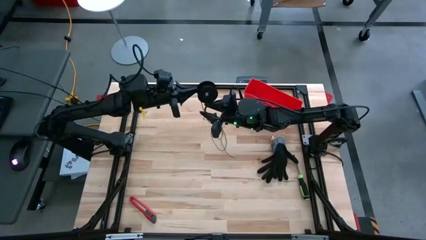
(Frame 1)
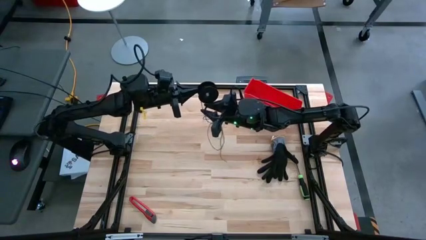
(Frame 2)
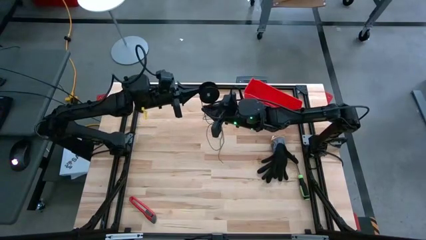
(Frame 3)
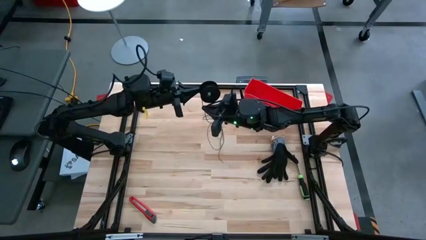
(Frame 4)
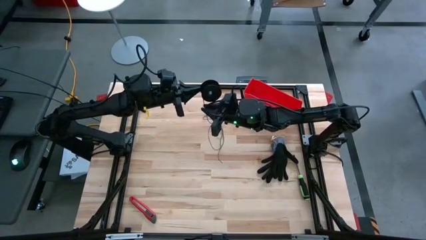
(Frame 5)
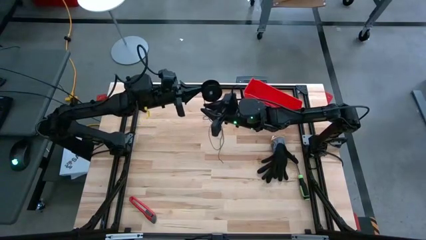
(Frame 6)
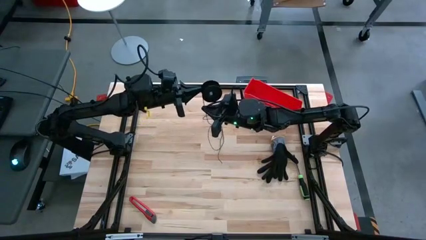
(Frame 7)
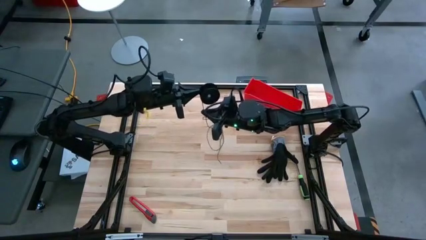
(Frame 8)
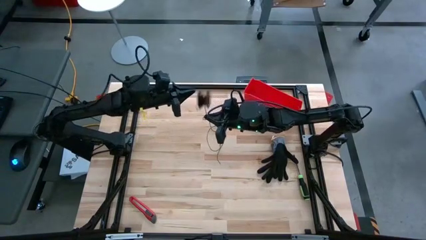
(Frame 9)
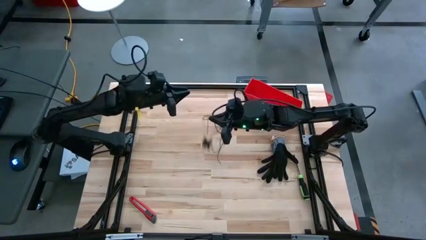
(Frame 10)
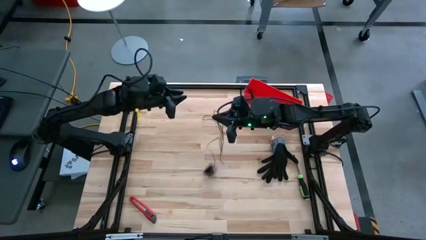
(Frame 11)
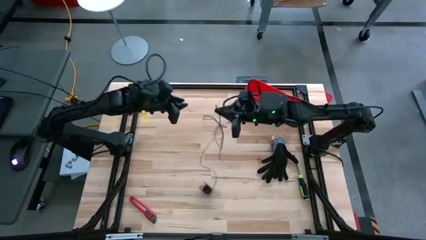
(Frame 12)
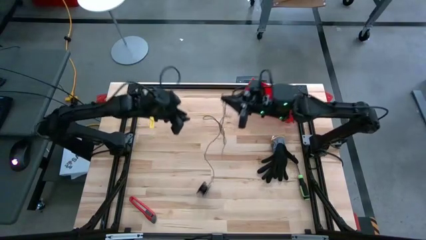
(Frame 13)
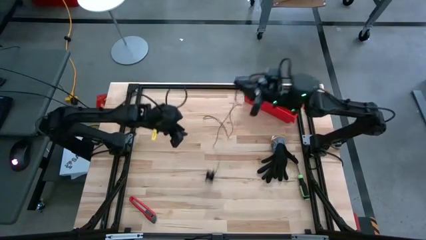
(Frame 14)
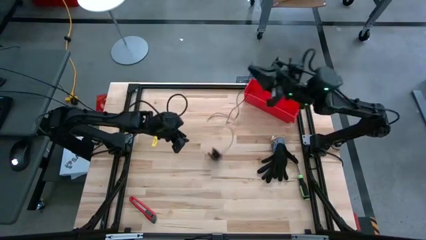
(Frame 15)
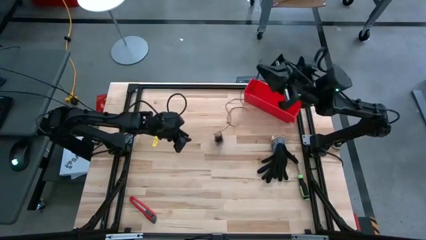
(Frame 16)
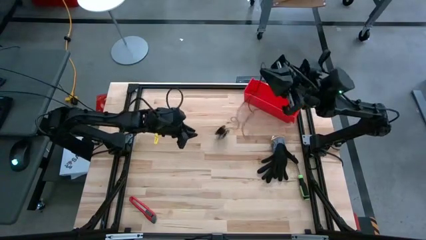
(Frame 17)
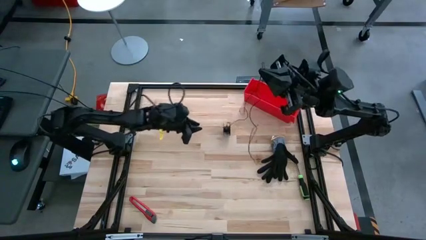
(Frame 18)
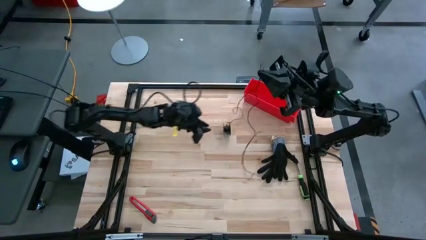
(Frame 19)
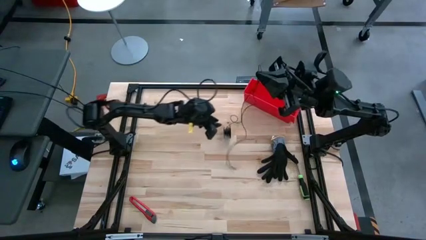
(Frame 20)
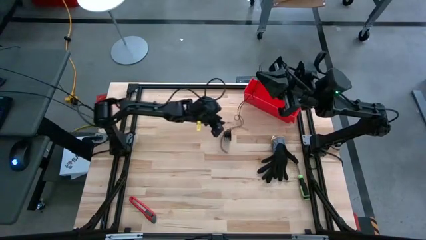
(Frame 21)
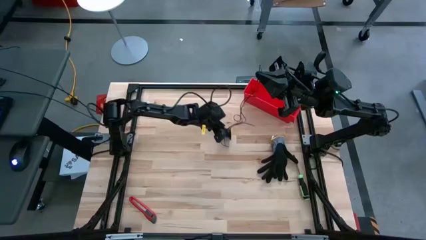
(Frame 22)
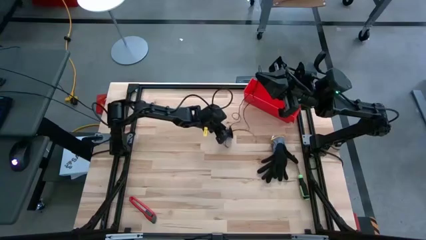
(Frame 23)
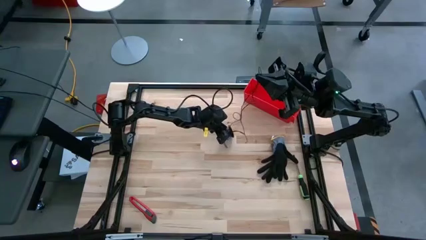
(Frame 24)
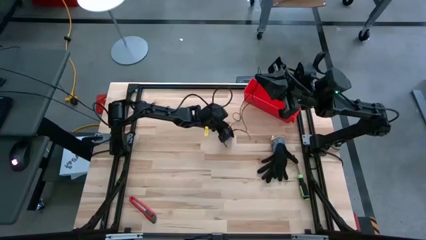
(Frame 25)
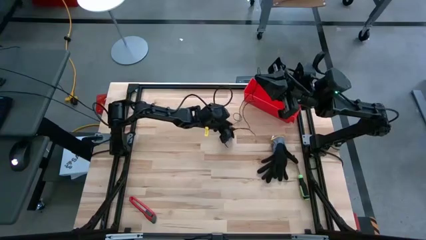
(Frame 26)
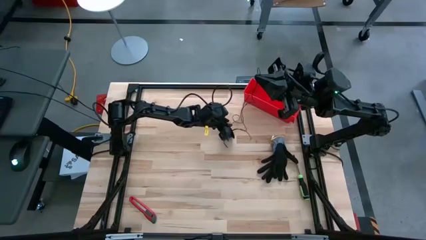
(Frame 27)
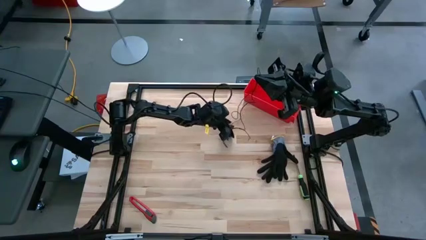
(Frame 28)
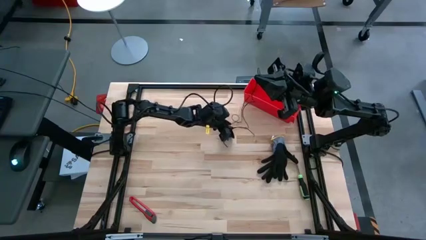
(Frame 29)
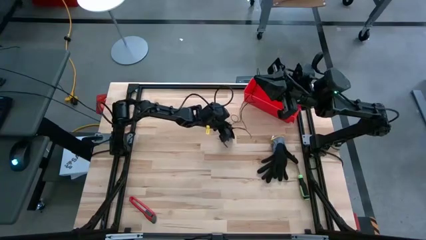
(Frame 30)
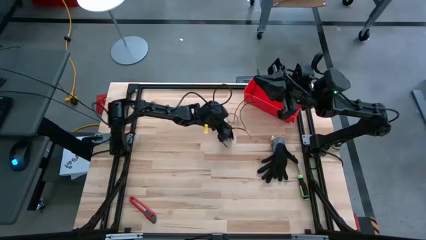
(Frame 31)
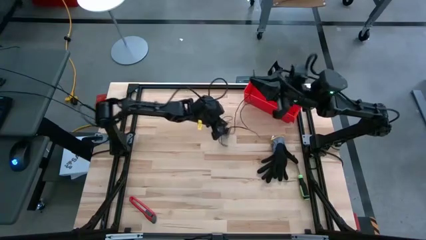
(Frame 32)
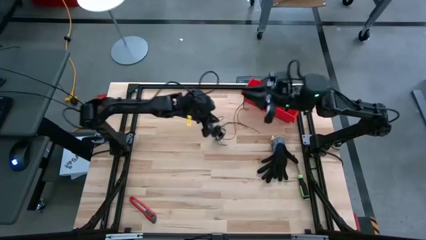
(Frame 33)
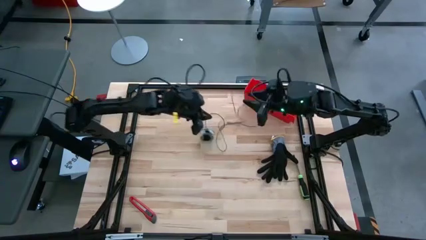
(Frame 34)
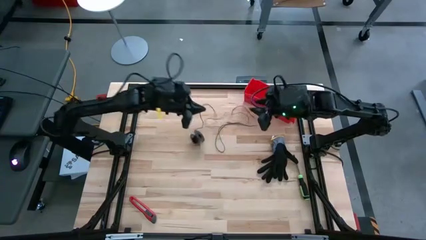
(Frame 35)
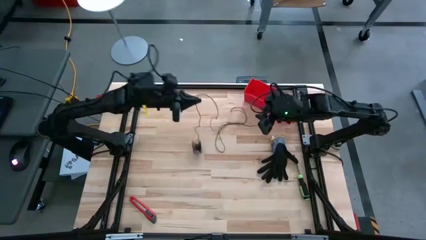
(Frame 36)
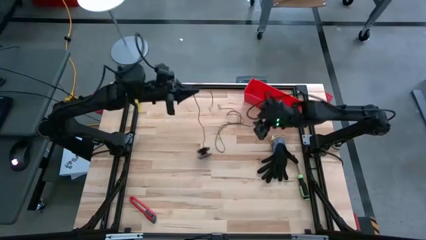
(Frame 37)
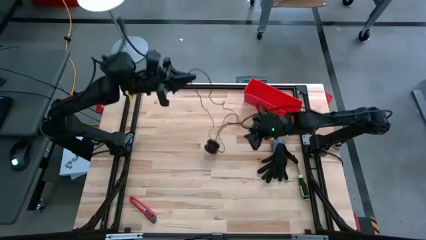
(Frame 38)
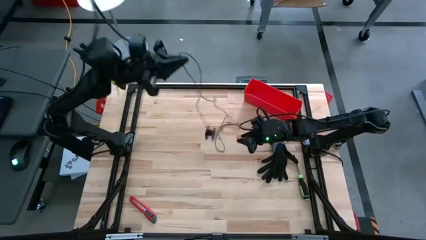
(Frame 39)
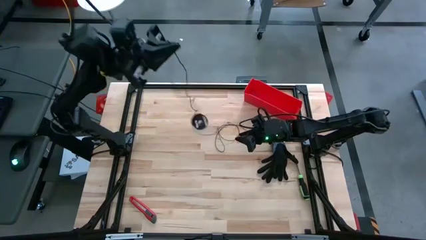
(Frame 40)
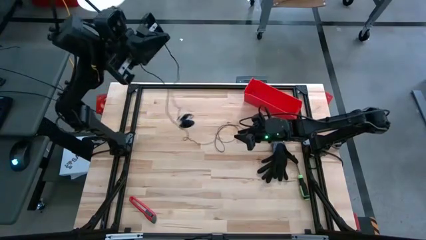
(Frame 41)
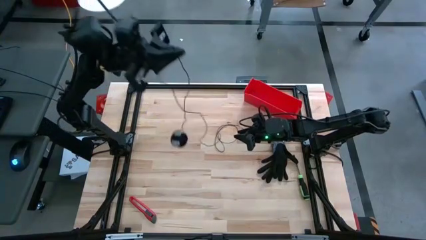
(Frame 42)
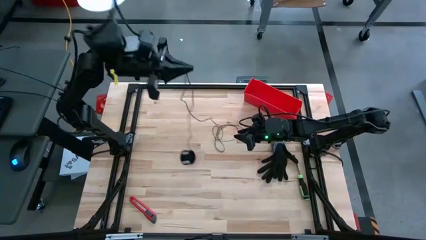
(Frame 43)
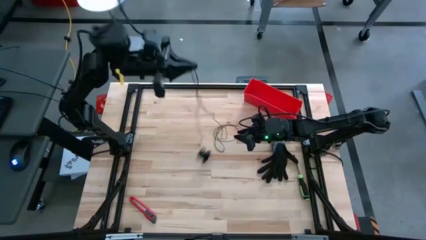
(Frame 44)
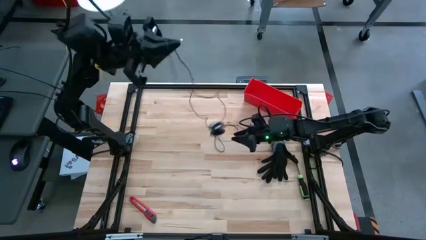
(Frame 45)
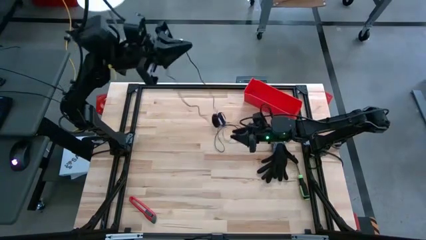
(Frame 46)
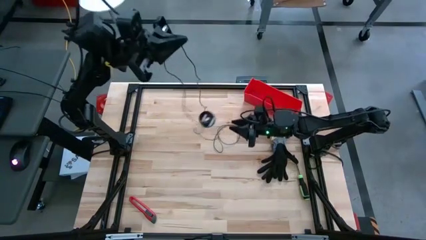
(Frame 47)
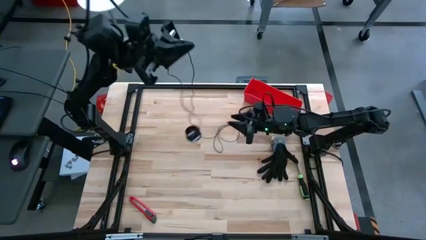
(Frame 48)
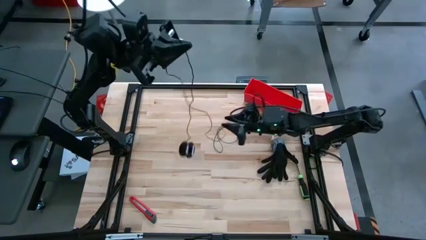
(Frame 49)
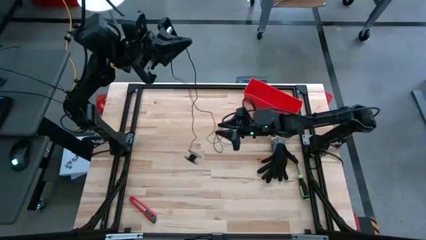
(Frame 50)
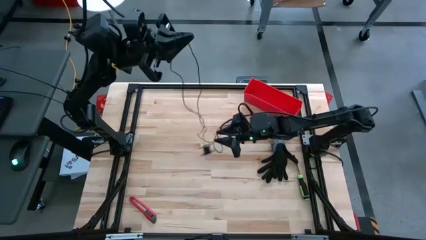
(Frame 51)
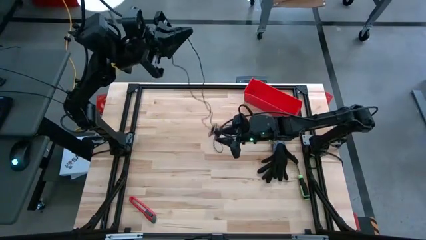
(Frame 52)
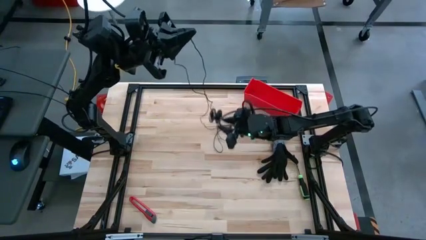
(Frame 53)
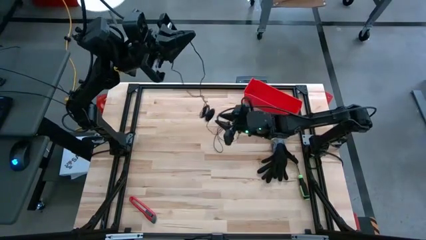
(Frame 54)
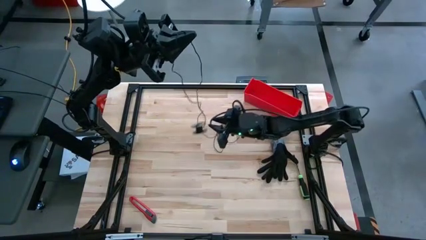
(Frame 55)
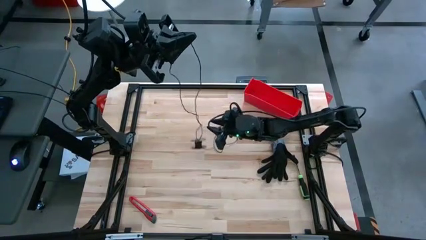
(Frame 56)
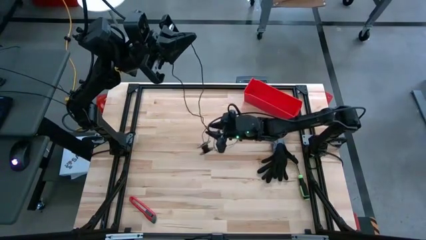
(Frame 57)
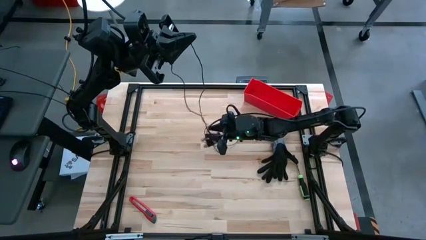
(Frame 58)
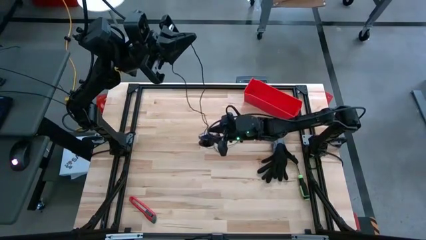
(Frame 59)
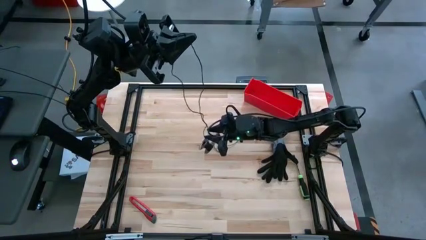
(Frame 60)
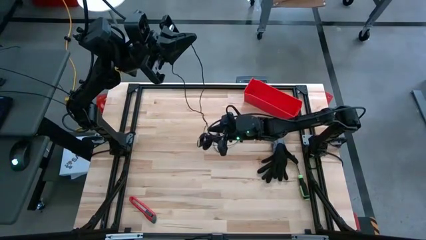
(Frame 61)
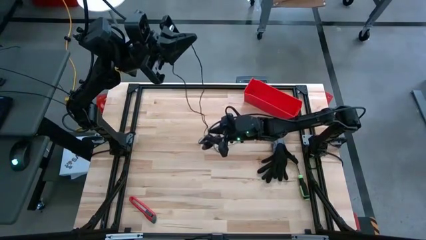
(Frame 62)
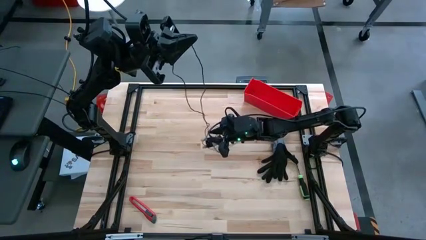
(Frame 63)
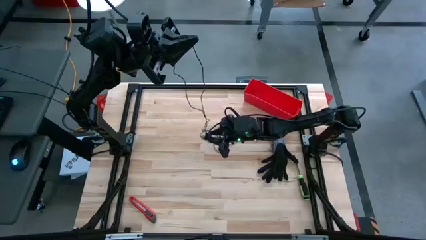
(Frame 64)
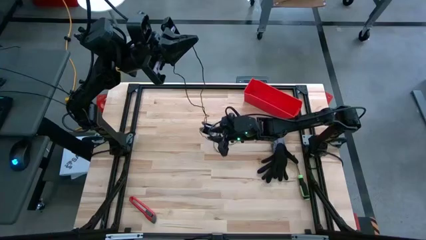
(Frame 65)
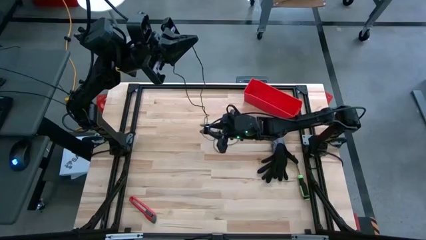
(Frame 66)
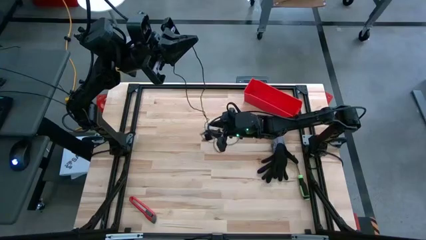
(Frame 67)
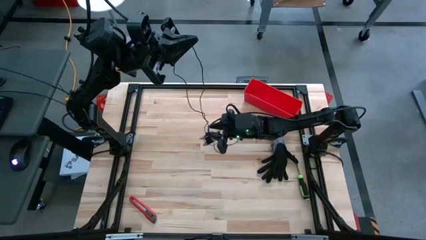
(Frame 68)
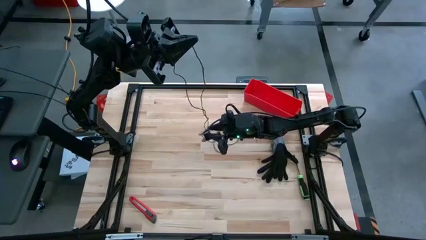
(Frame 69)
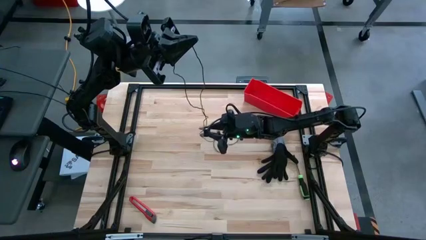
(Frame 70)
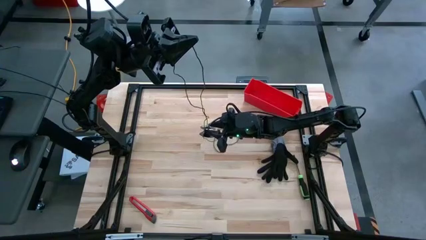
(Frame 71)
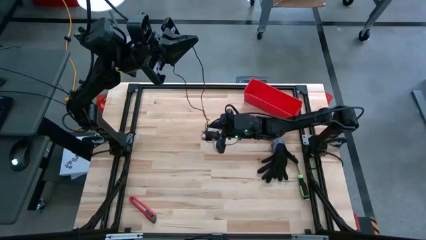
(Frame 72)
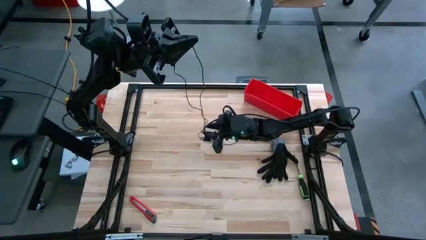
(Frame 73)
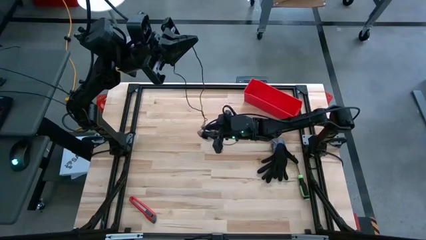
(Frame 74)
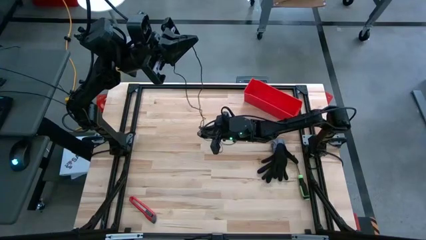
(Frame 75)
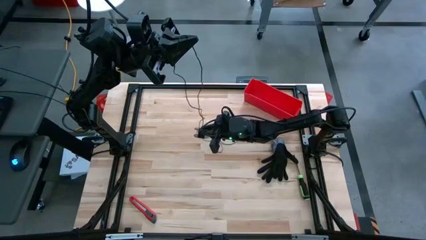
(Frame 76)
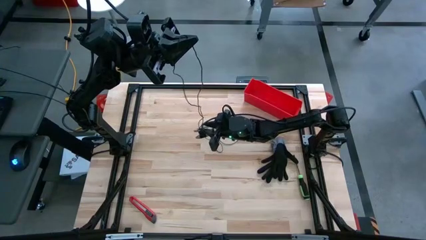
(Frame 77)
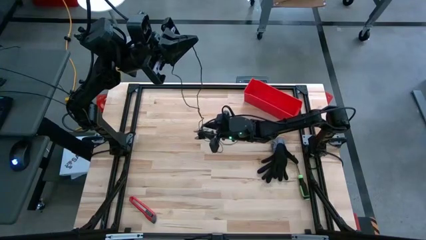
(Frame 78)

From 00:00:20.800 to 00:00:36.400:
Task: Coil cords
Uncoil the black wire from the spool

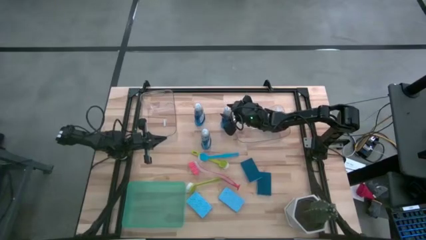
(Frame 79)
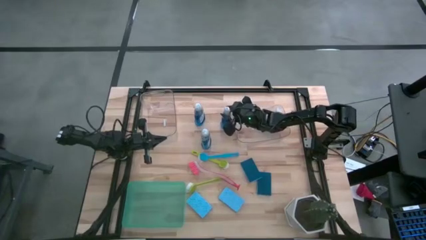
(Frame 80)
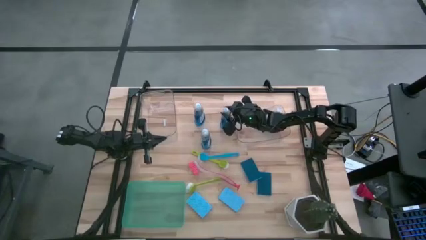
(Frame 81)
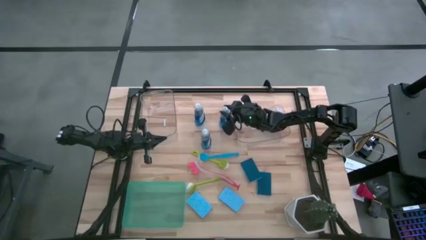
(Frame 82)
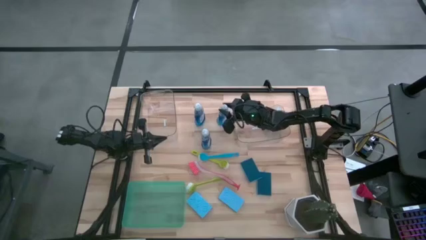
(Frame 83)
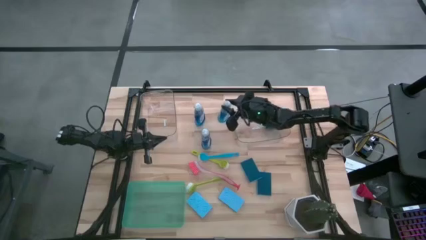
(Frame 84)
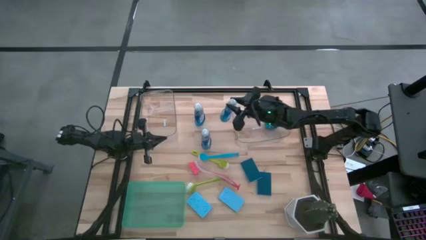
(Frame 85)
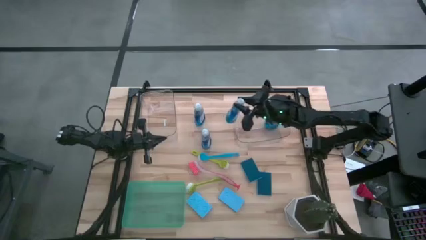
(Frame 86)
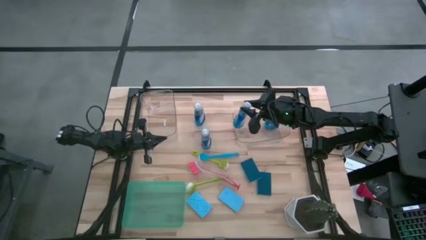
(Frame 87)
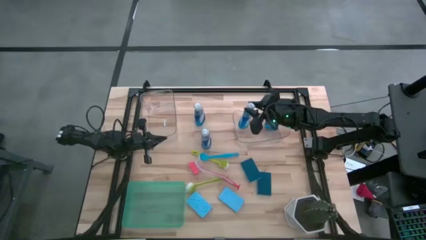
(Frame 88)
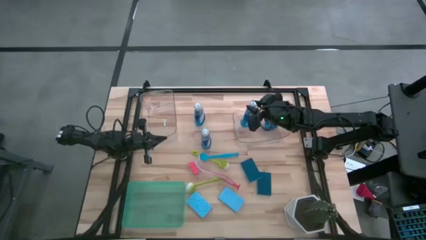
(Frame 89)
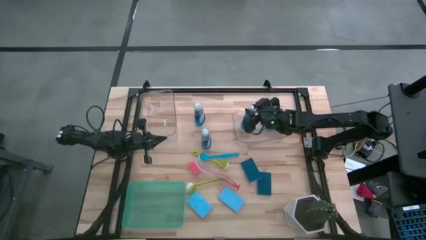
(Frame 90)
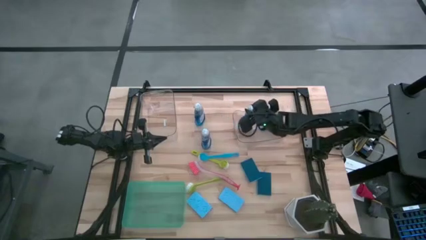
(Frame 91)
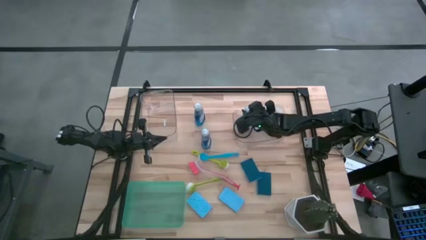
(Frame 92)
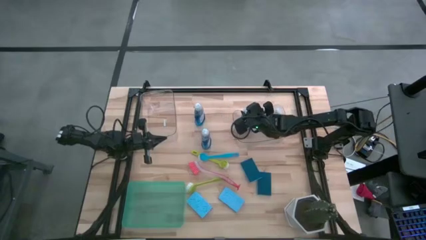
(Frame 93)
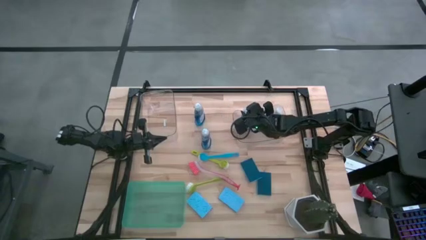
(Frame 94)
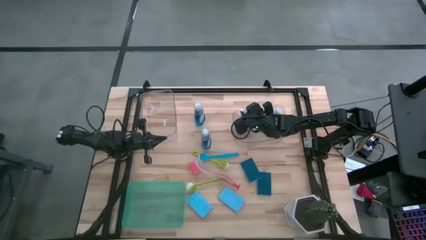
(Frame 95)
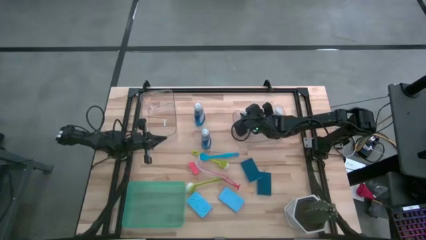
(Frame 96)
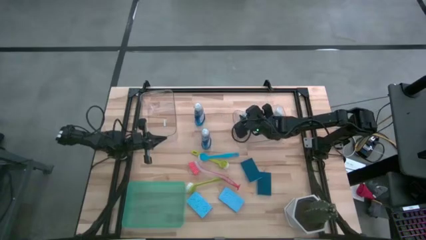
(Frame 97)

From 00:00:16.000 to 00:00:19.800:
Task: Pick & Place Kitchen Sink Supplies
Put the soap dispenser into the right transparent bin
